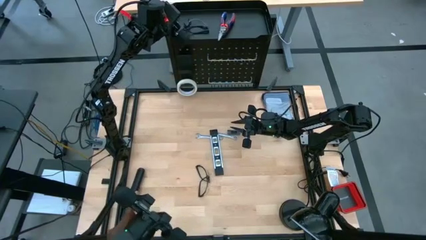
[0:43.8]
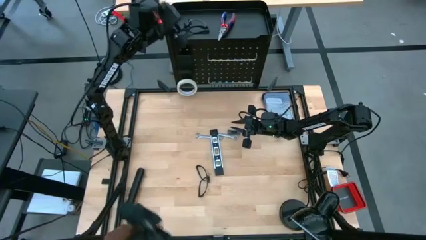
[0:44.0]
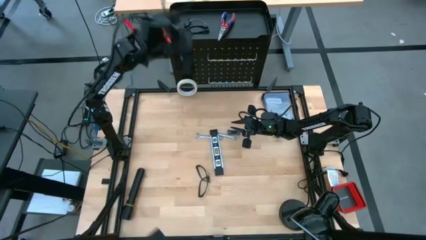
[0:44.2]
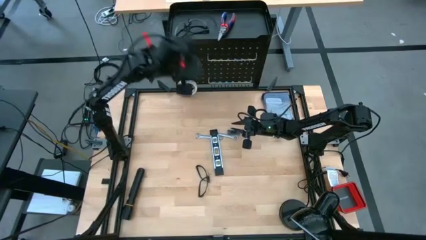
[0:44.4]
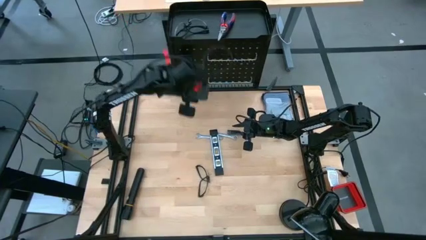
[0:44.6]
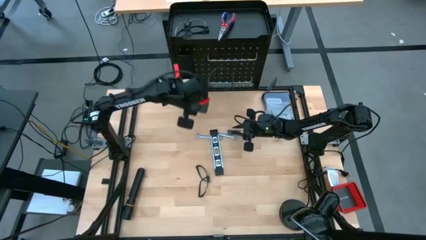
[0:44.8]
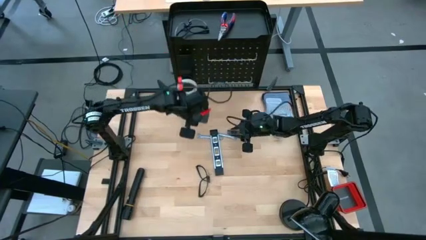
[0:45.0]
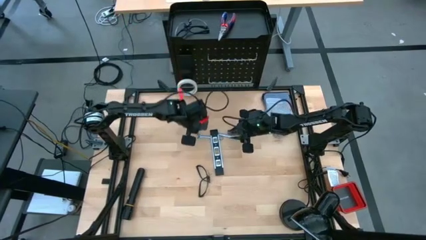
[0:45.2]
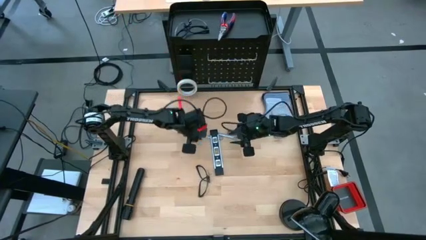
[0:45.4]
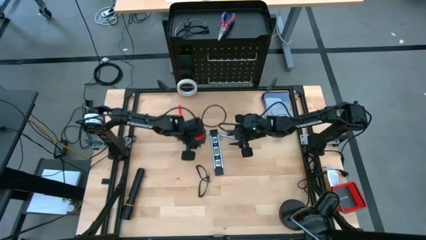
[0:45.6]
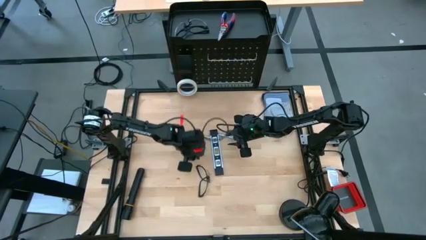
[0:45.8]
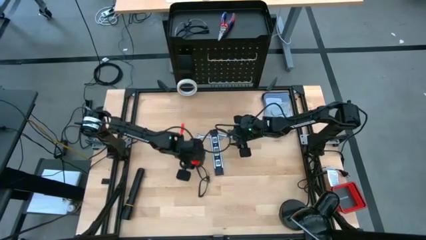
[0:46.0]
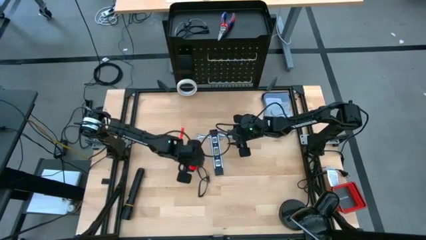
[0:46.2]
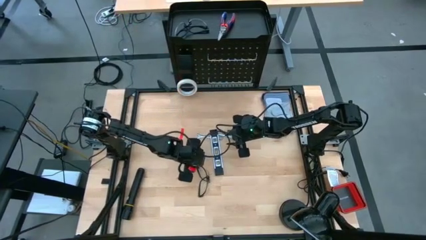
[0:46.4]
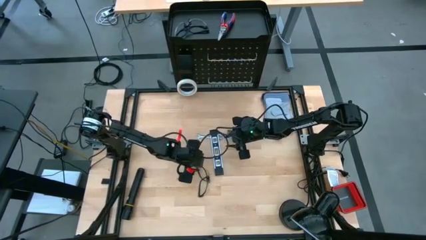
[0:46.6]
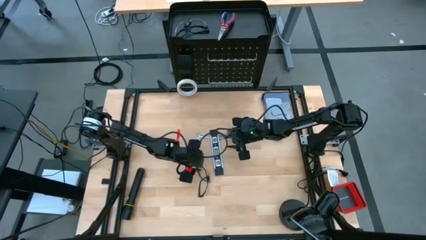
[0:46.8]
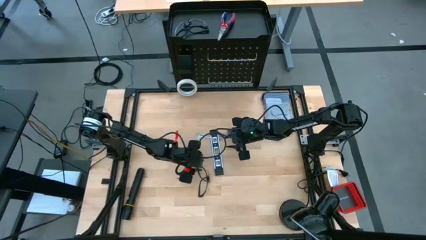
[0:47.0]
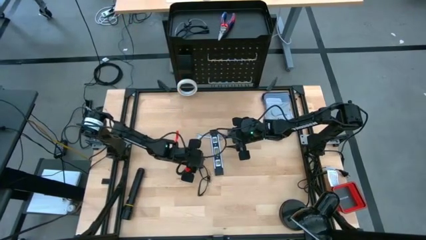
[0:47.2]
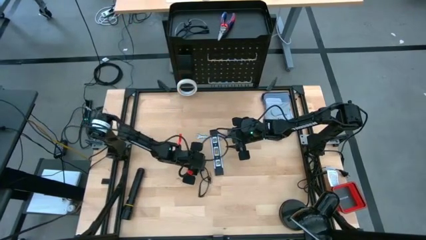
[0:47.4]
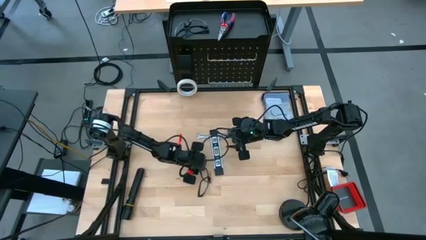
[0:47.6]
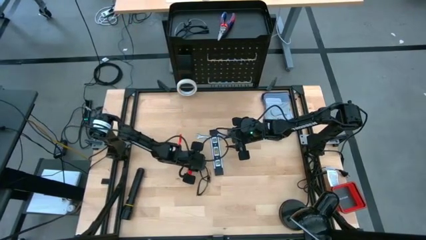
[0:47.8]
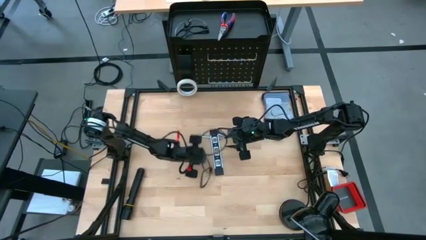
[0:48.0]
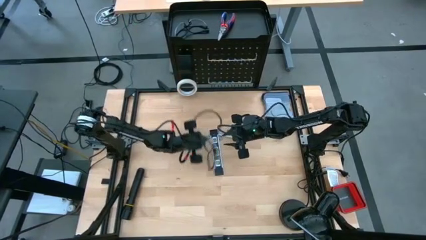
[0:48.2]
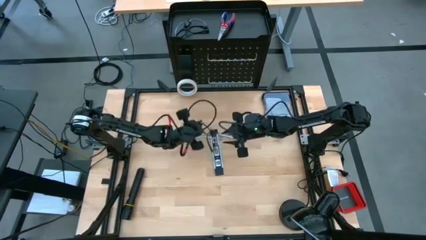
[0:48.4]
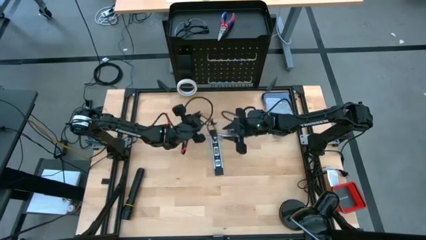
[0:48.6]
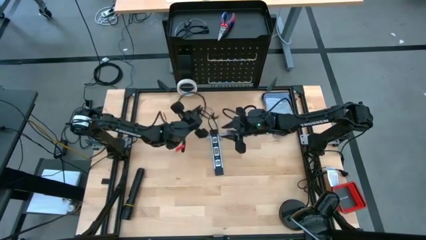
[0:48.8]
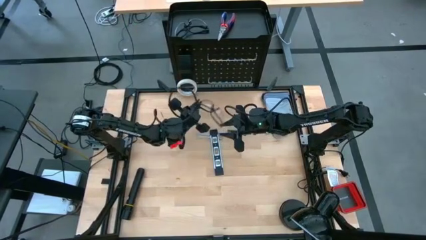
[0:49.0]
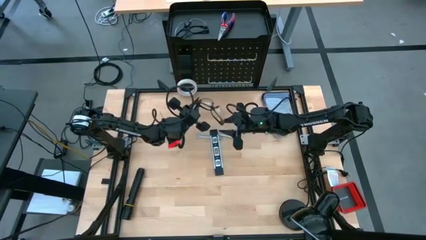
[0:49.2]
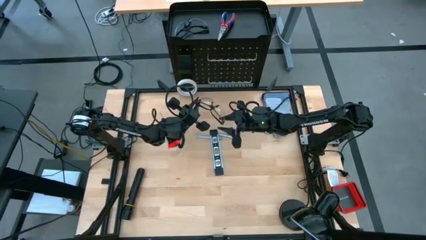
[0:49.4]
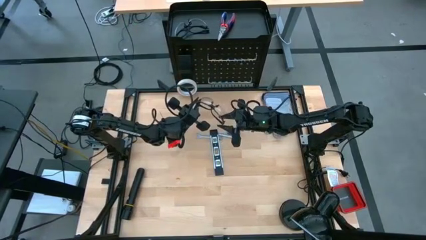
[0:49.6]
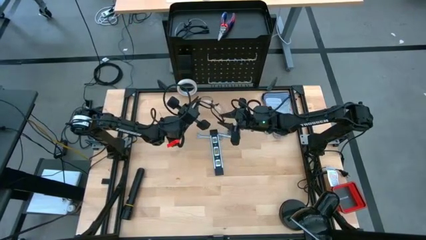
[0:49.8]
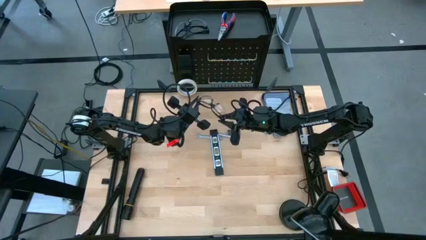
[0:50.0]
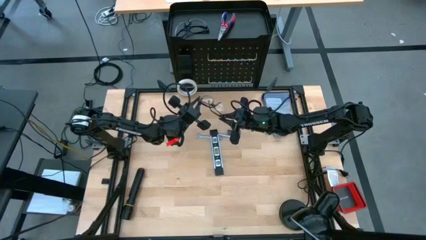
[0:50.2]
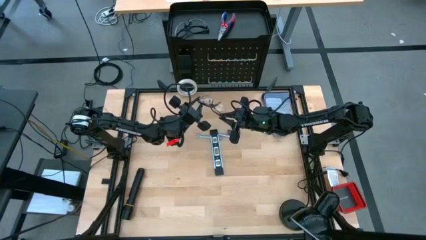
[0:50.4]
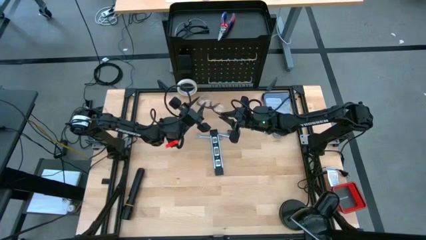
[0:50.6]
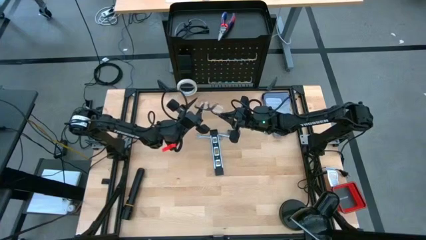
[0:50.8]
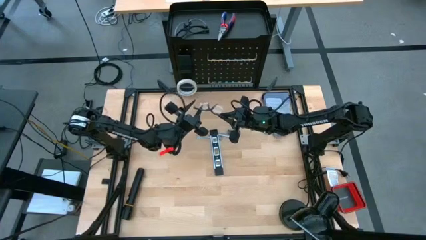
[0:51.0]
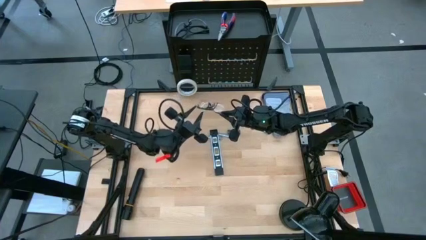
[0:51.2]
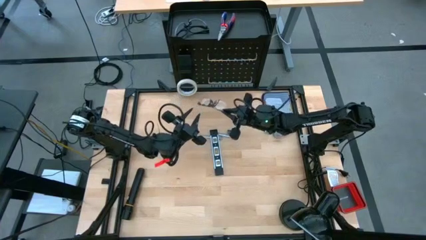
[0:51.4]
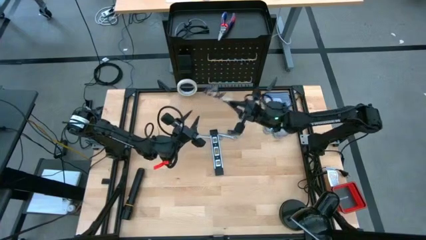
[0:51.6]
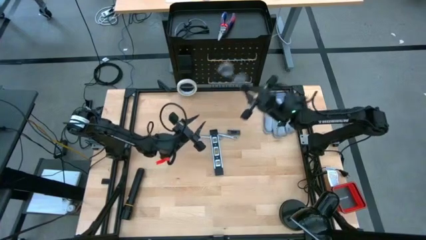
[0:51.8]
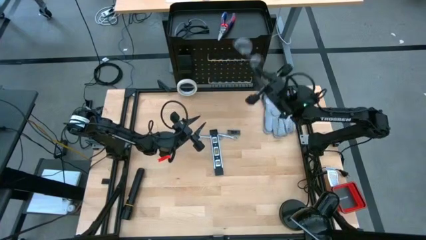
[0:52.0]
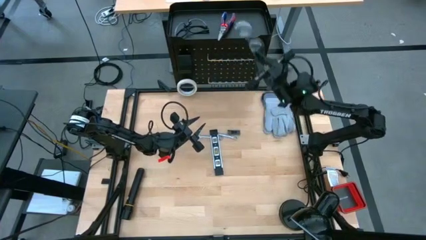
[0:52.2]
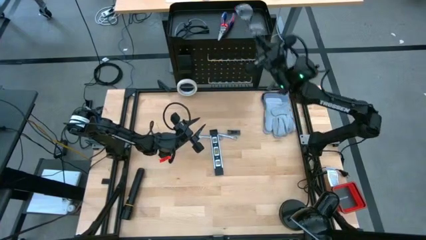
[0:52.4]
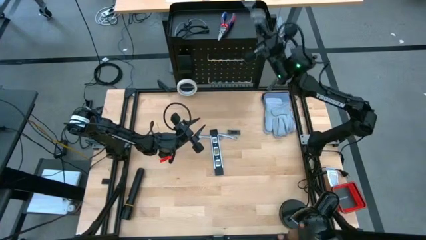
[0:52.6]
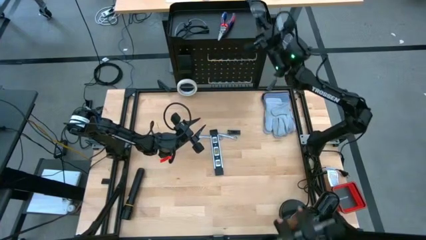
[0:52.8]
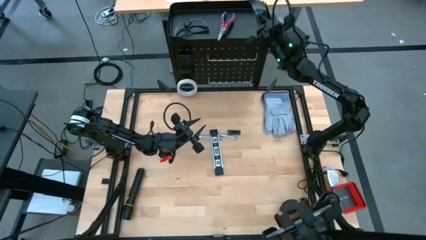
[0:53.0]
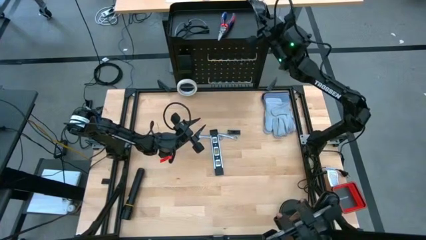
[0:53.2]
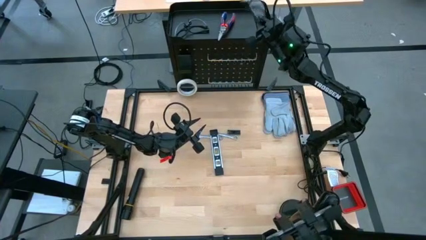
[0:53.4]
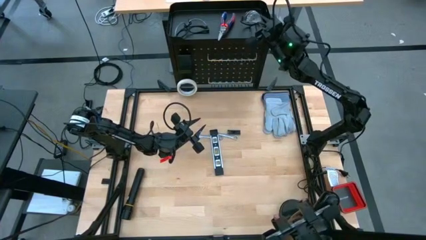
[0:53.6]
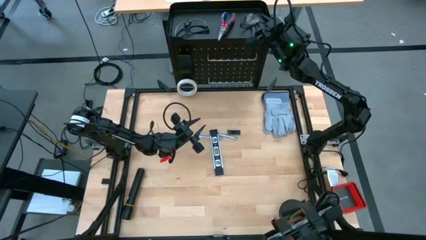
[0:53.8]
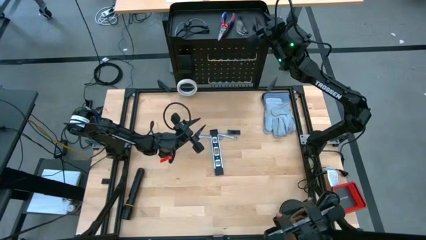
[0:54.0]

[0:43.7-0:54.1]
Task: Hang tools onto peg board
Put the black safety glasses on the black pegboard
